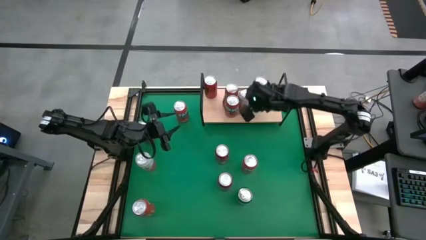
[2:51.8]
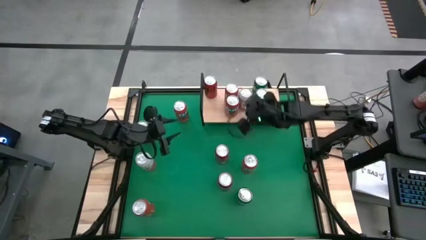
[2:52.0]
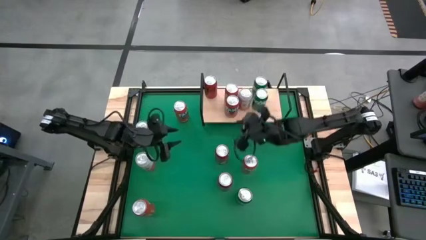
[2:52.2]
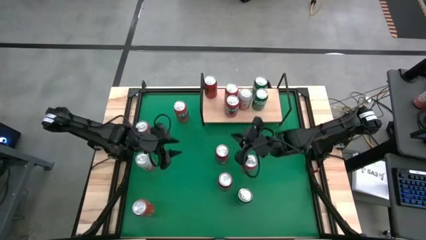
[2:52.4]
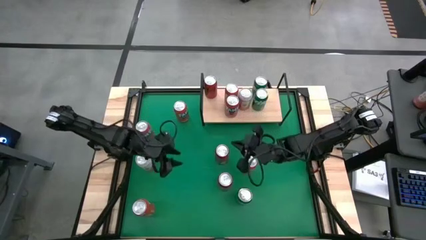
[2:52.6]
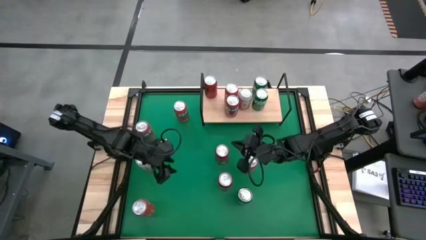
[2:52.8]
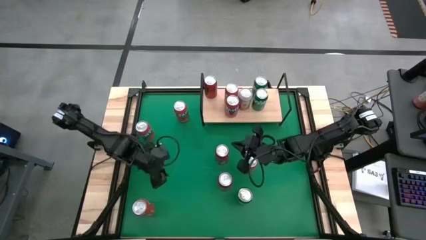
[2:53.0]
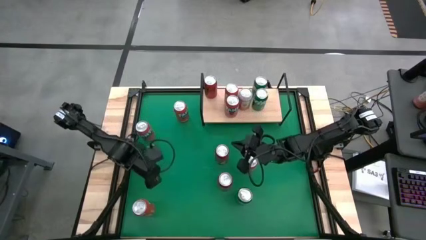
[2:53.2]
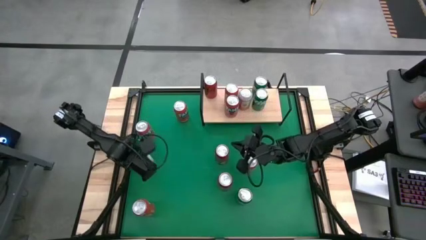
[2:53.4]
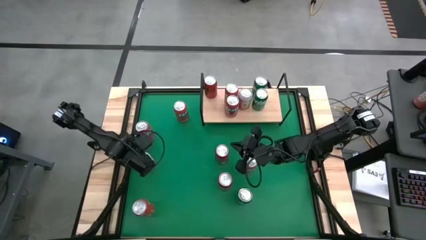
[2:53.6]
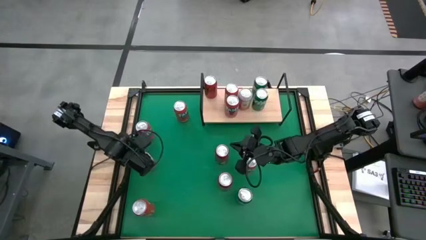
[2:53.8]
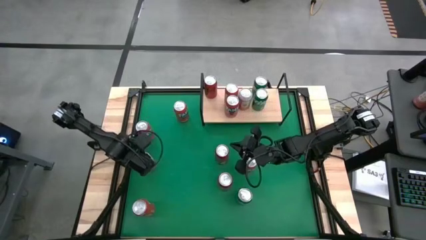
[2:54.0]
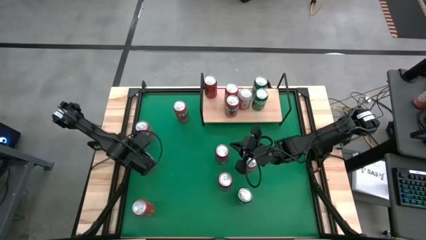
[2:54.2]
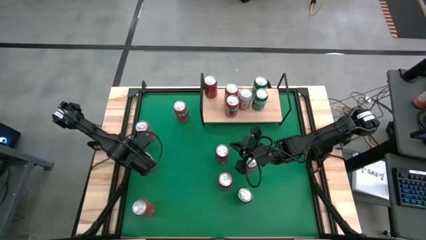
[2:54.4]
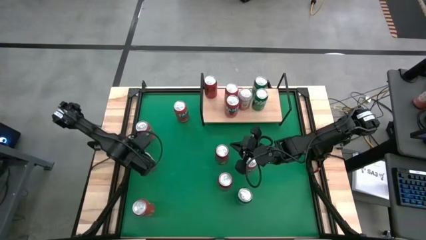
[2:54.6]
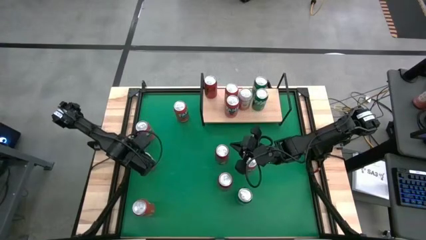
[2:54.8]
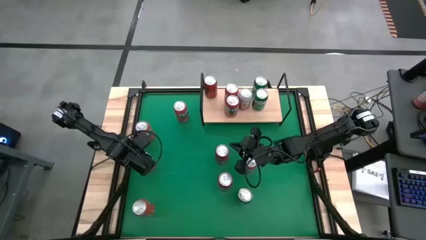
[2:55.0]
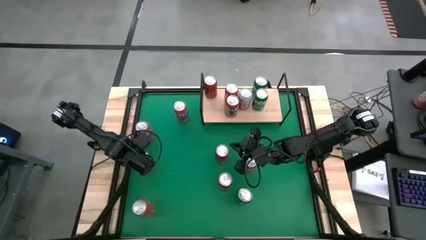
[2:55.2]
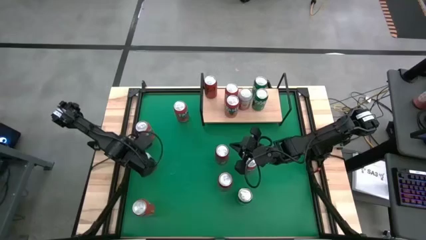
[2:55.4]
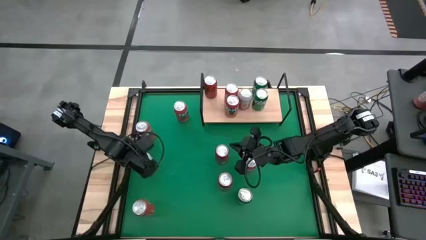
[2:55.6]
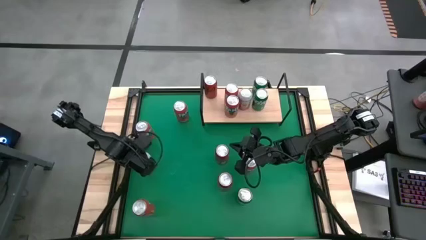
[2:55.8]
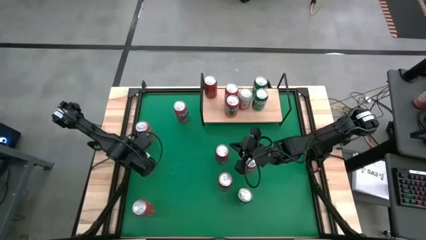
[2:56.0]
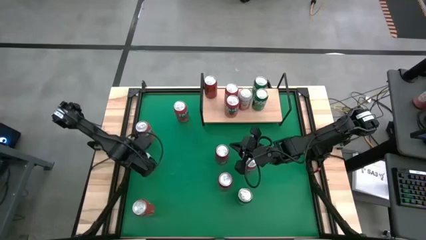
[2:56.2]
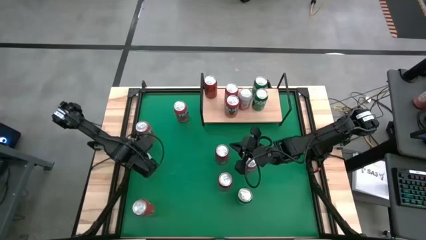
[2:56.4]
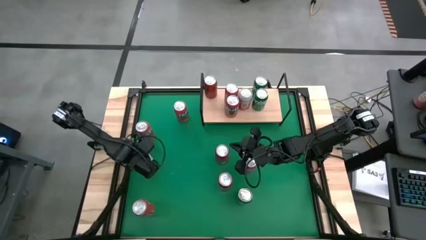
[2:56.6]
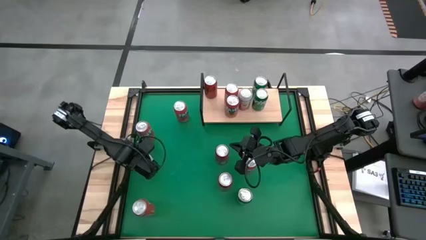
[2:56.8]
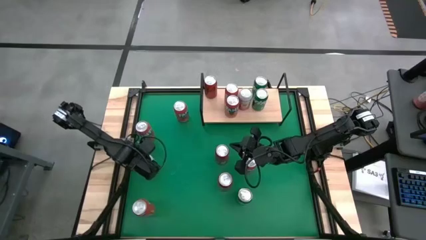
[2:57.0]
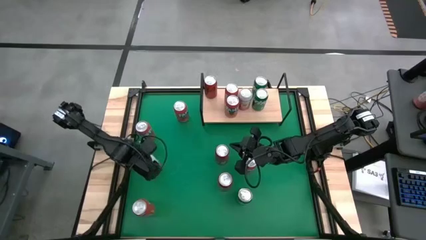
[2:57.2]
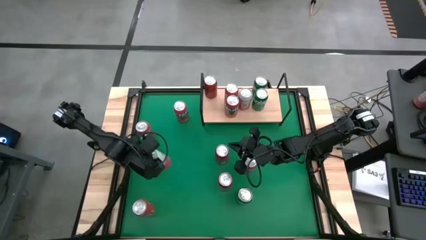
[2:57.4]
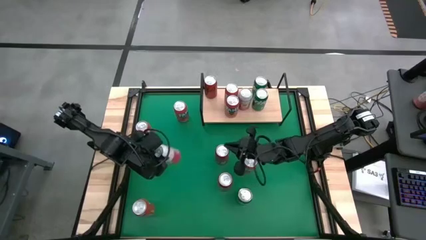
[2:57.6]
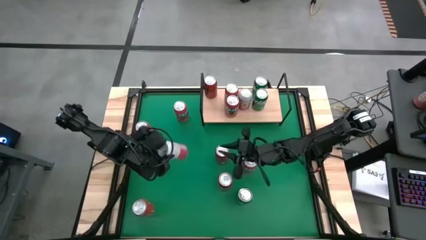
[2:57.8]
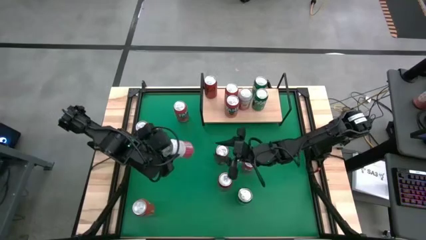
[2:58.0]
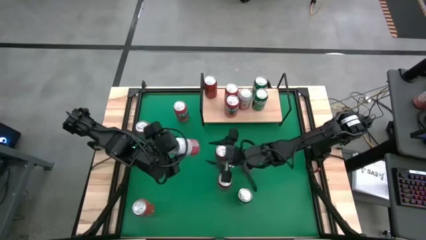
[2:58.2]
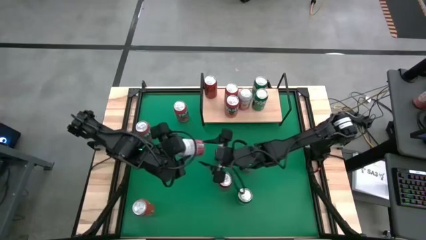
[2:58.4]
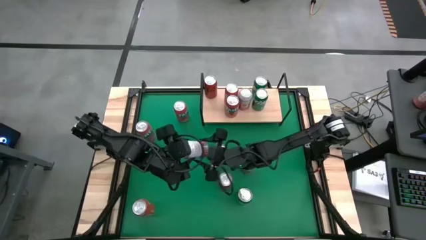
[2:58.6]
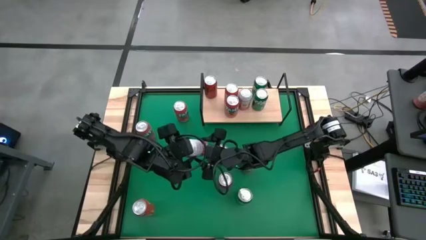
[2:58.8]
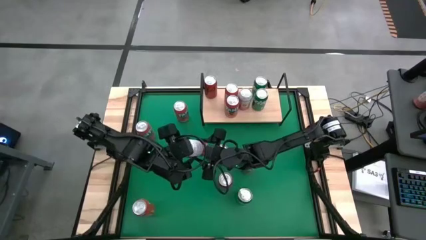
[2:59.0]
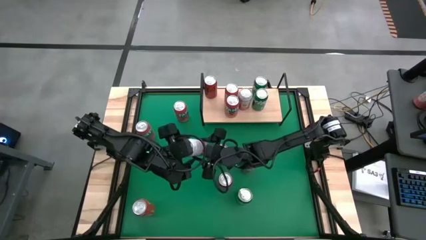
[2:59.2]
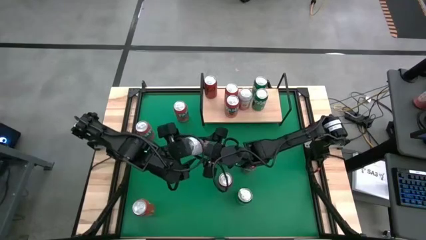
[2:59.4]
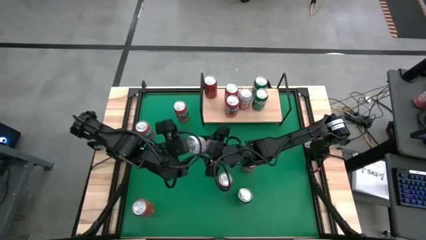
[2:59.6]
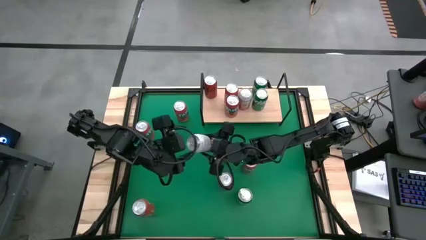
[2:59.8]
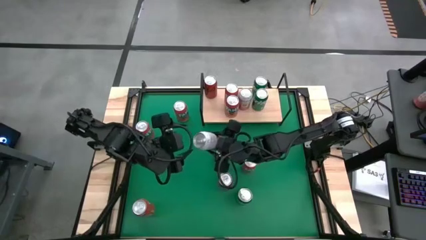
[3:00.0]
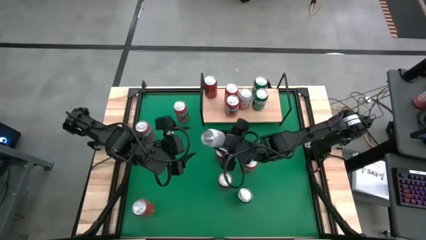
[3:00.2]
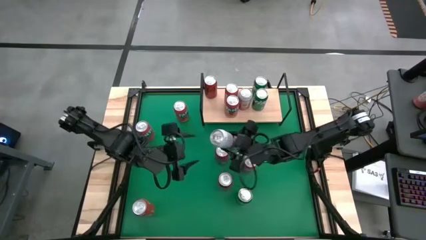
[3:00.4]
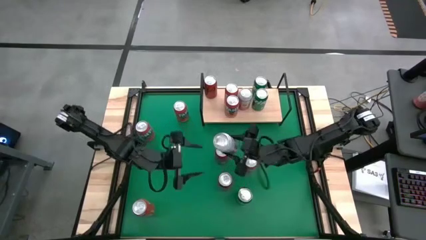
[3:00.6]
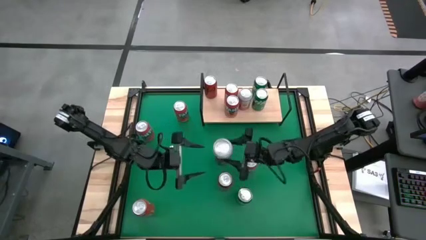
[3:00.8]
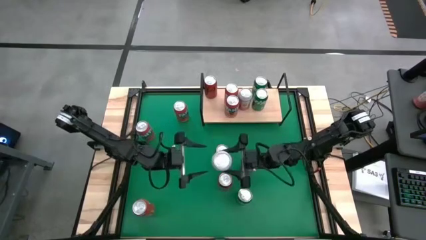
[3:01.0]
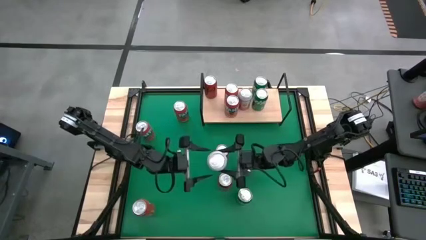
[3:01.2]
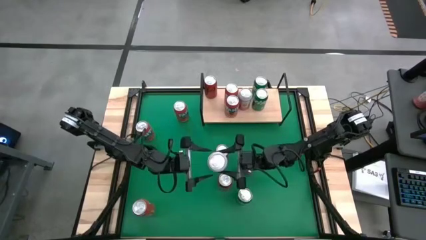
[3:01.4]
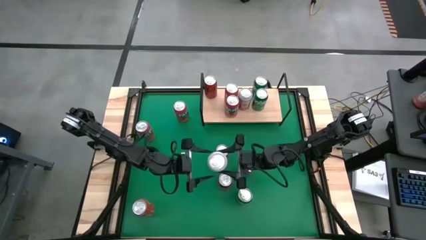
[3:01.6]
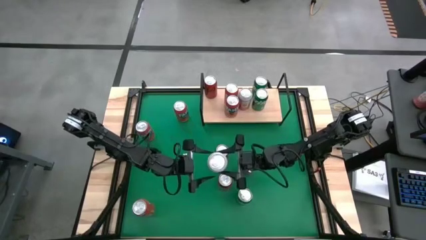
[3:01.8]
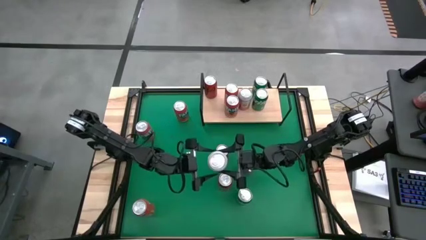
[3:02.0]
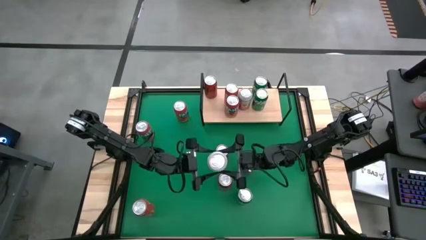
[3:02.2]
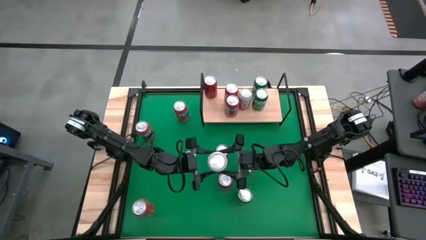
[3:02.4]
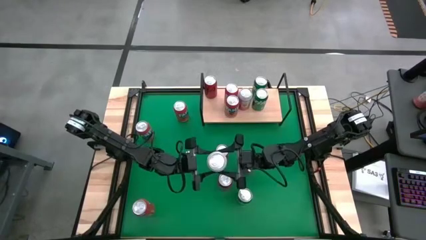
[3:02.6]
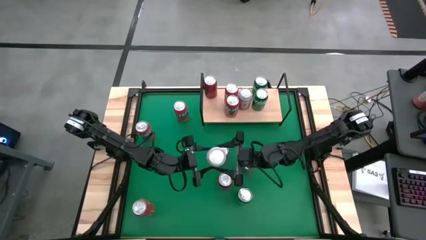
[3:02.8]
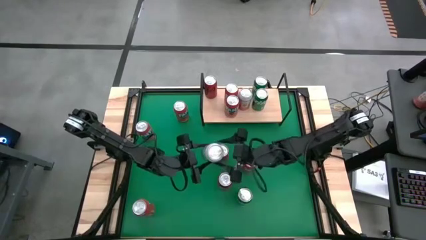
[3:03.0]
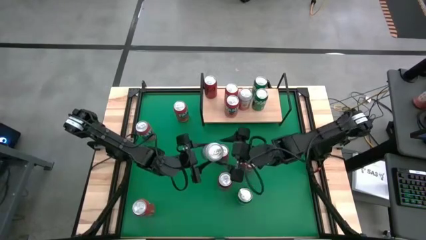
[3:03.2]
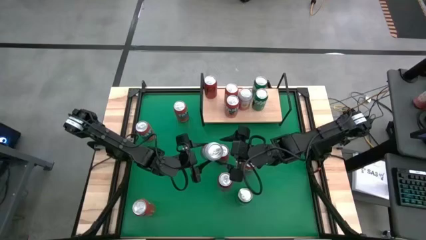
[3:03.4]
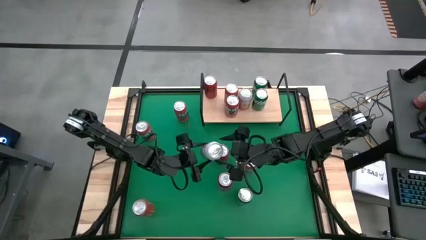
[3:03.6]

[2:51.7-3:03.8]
Task: Place canned beverage on shelf
Put the pink-white soda can on the shelf aligned with the other pink-white soda can
